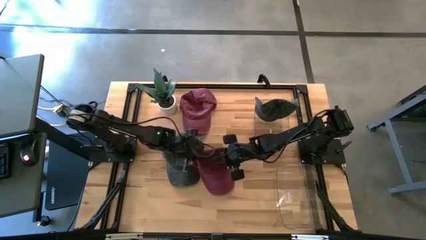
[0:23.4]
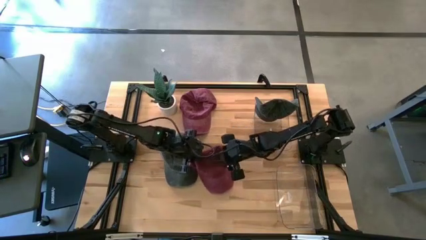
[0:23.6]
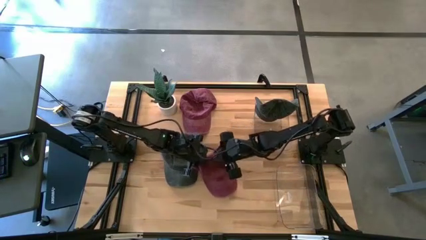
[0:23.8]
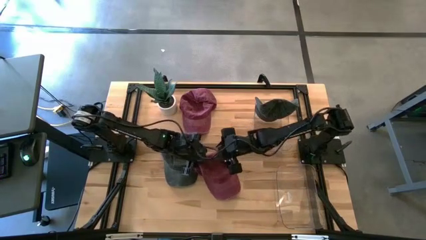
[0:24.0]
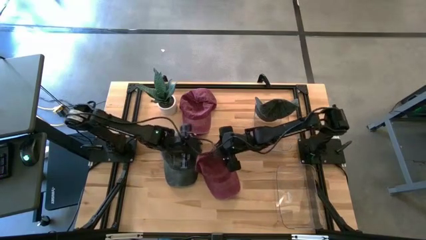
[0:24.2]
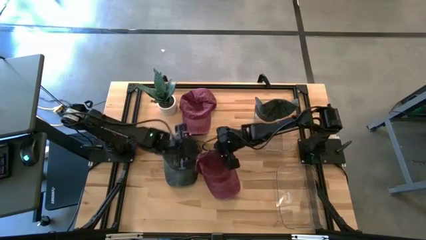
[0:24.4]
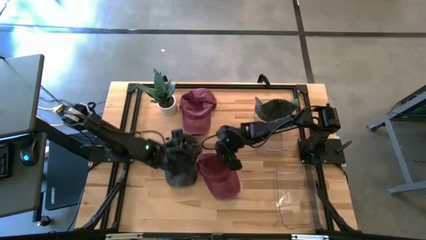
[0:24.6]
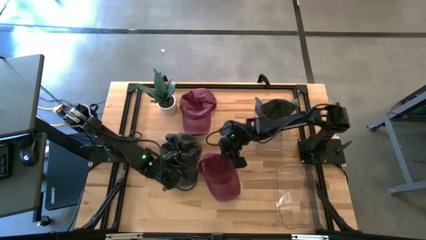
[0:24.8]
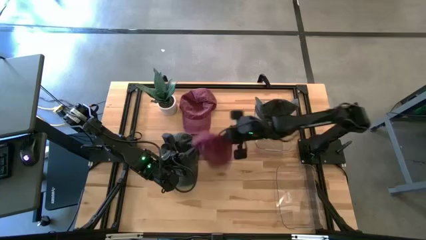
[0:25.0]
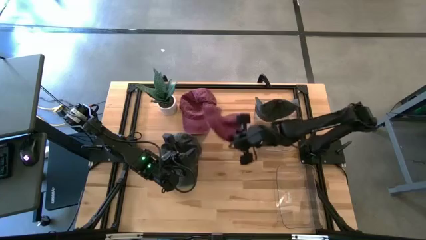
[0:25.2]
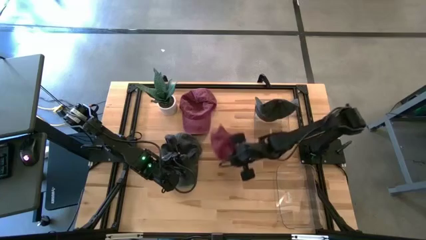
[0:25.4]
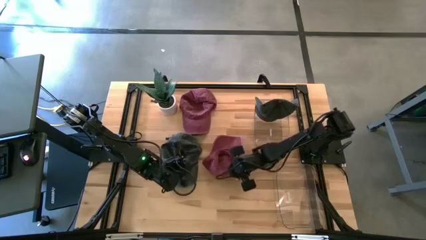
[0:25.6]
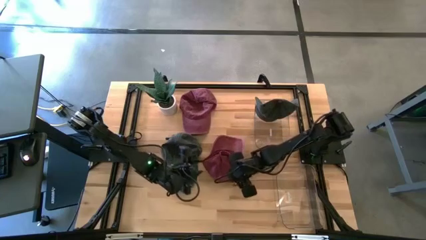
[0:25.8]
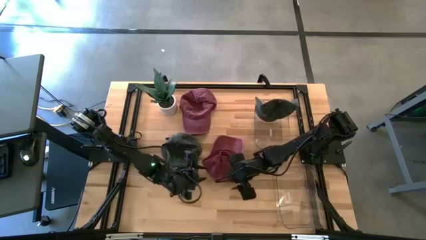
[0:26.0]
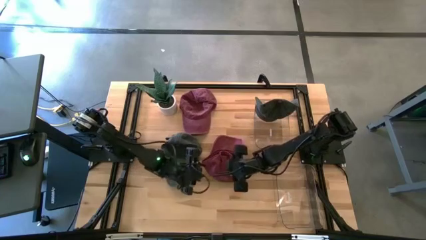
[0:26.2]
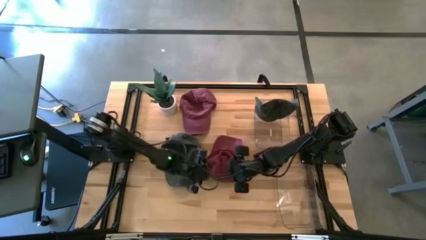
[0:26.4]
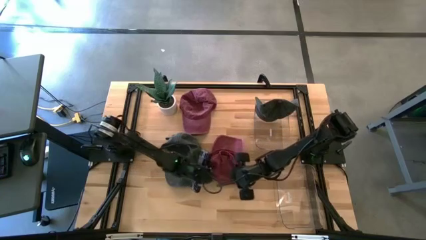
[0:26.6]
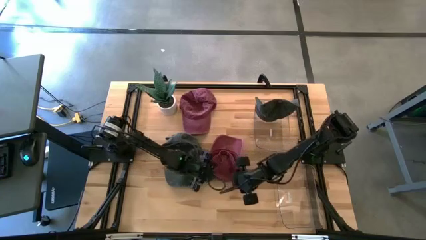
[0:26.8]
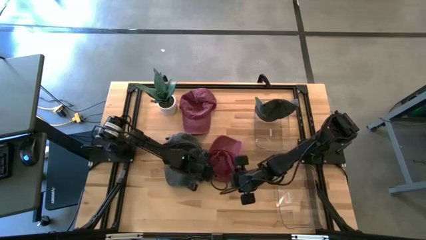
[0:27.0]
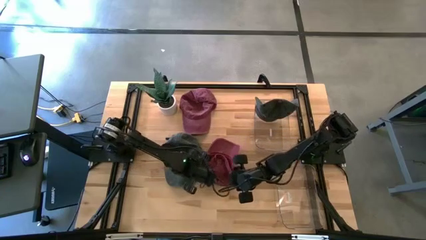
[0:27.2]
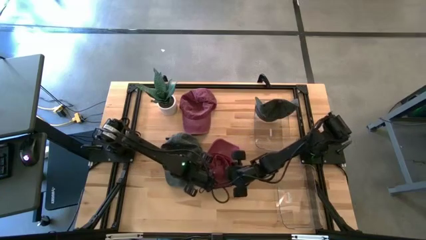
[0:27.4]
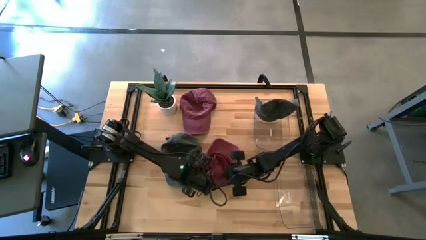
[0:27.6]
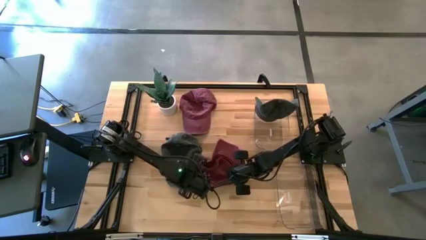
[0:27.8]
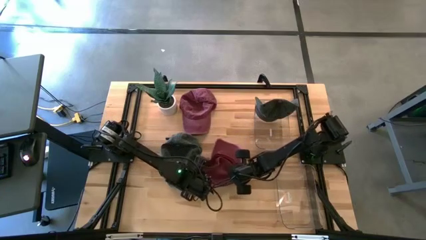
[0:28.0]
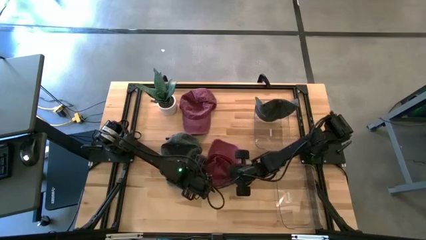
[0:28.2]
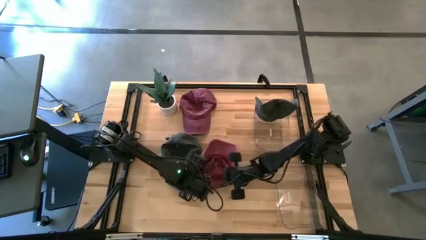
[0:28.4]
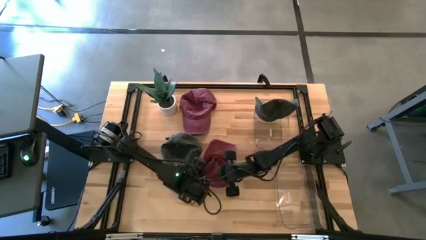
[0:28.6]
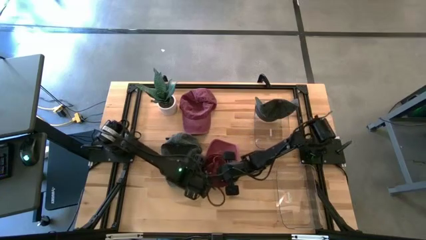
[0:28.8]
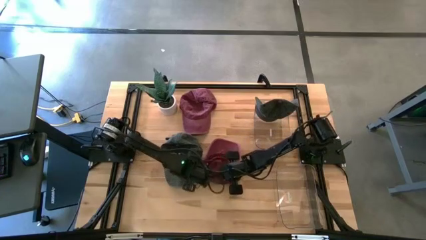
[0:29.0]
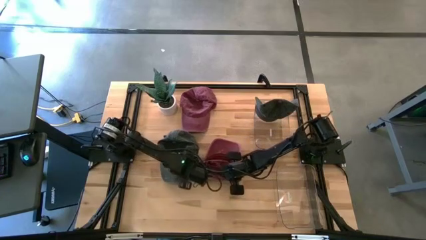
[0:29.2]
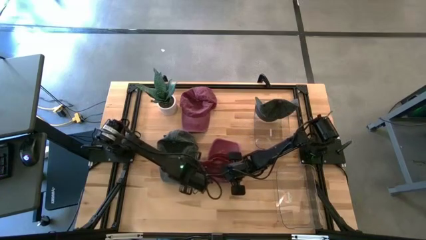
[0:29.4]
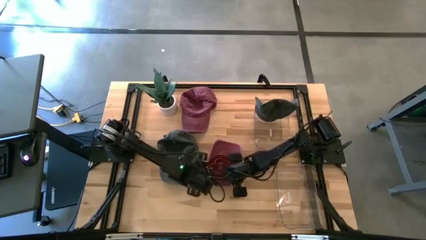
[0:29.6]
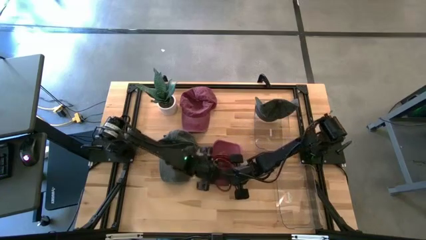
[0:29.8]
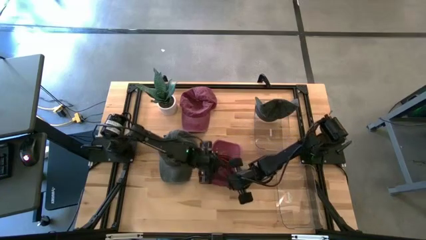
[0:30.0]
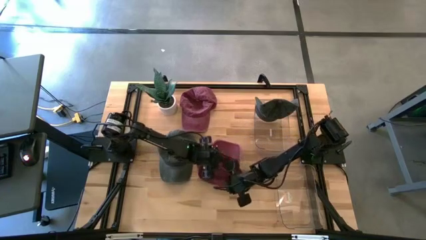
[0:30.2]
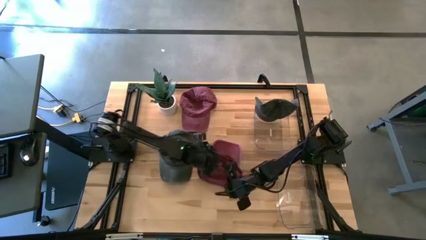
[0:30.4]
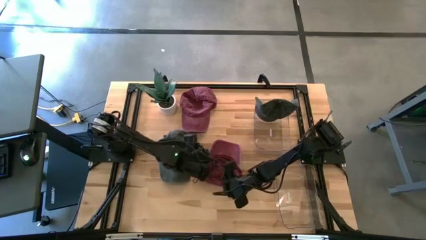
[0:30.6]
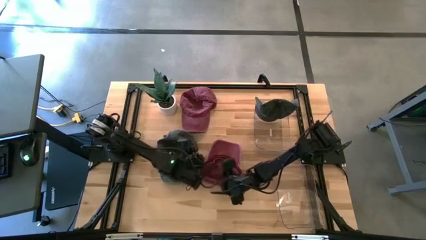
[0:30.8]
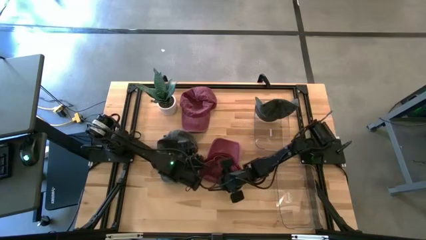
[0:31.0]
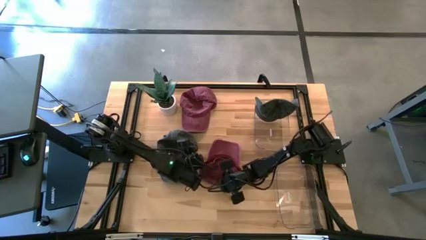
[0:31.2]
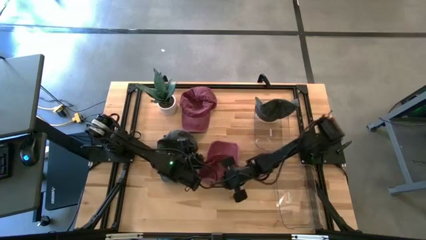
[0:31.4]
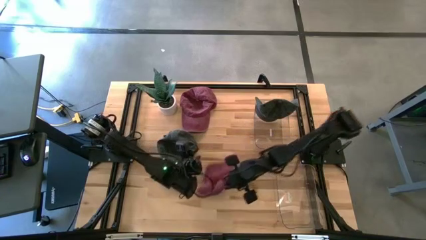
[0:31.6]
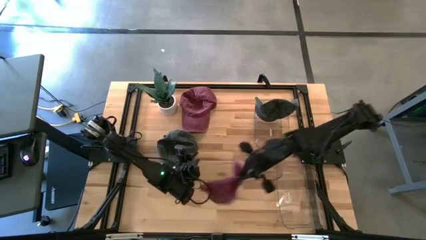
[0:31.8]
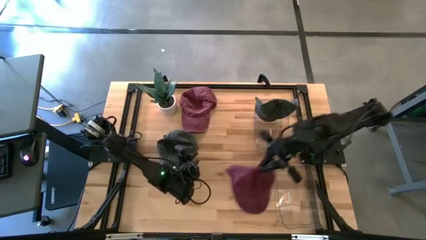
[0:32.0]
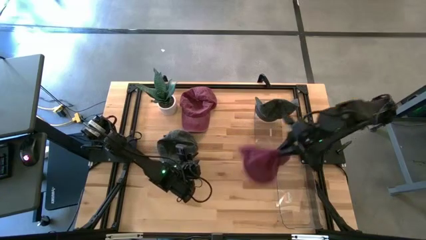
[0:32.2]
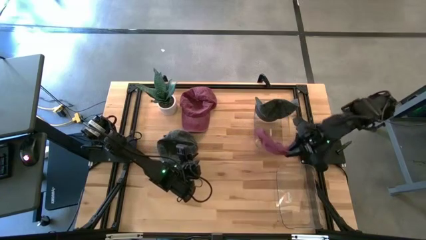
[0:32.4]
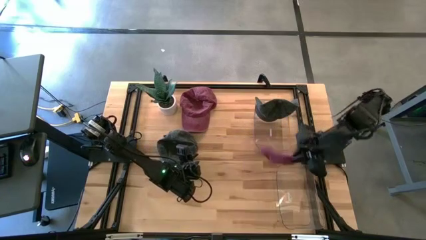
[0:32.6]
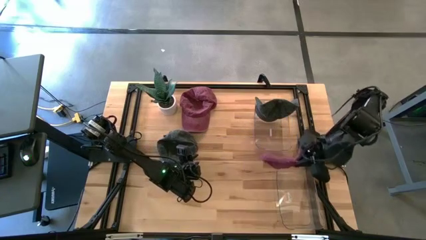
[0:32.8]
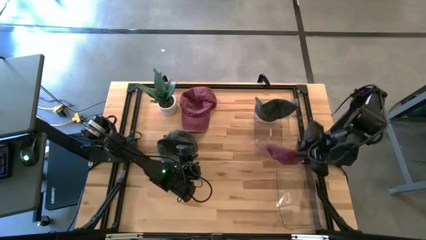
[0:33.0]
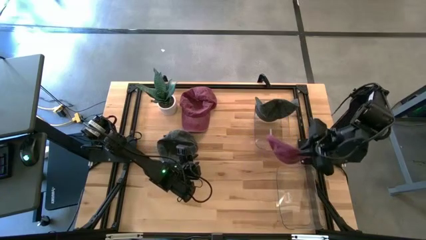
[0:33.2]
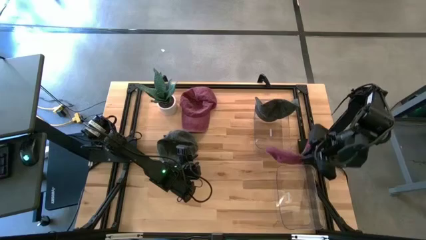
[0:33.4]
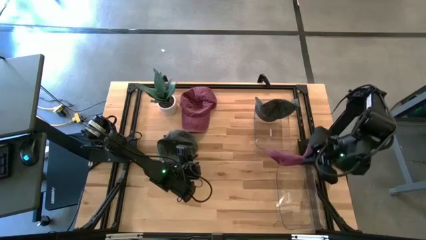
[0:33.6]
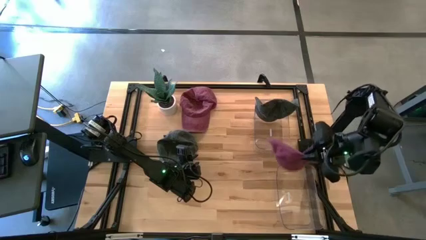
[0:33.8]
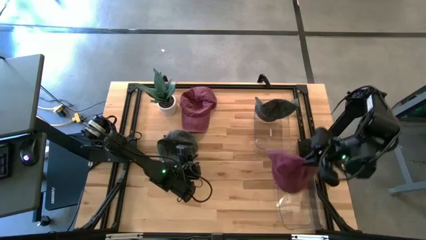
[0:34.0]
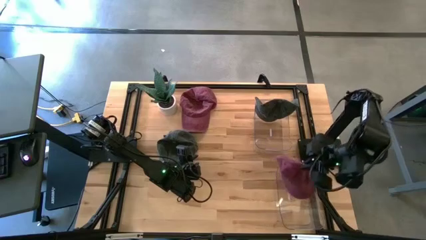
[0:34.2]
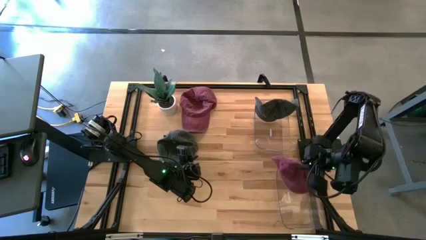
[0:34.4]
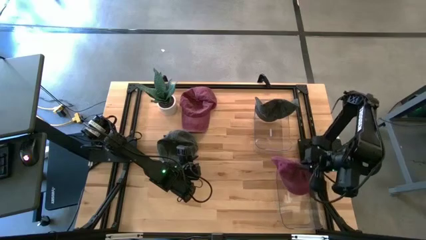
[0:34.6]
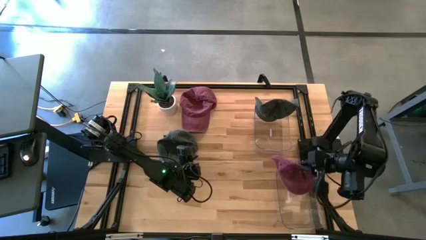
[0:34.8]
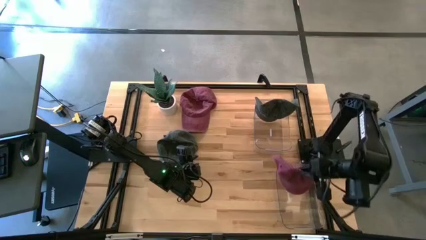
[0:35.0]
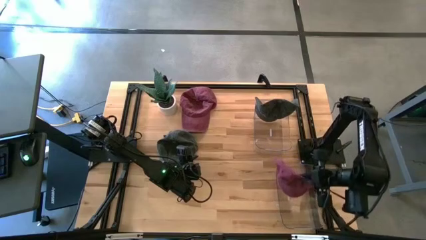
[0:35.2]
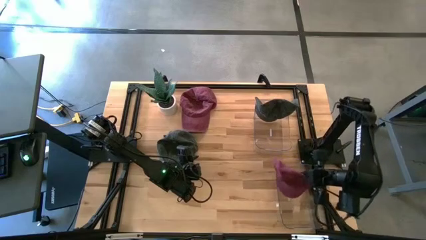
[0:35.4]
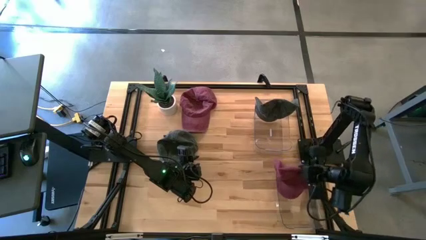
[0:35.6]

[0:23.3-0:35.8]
Task: Pick & Place hat
Put the bottom red cap into the bottom transparent bin

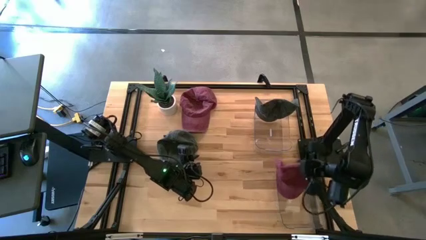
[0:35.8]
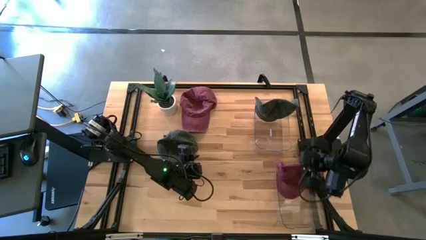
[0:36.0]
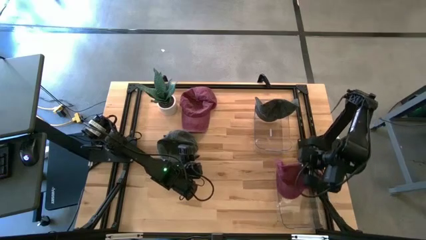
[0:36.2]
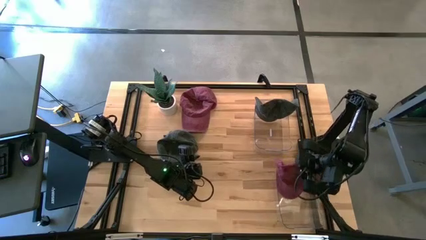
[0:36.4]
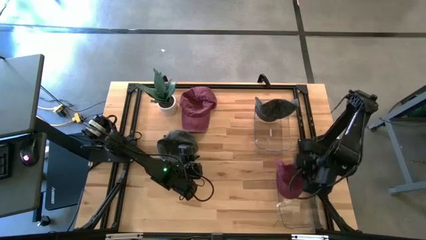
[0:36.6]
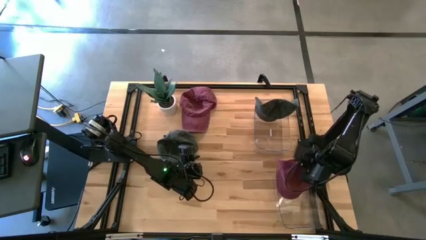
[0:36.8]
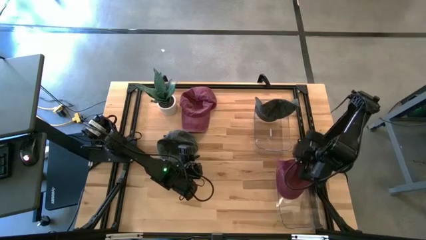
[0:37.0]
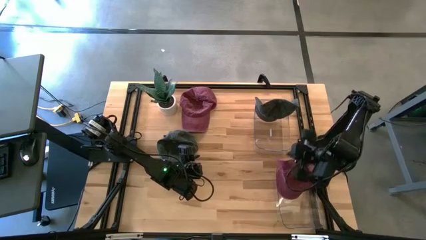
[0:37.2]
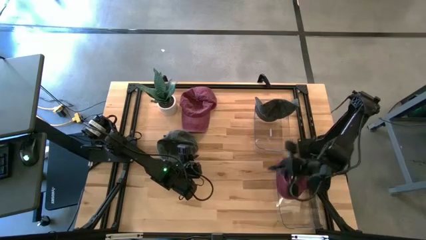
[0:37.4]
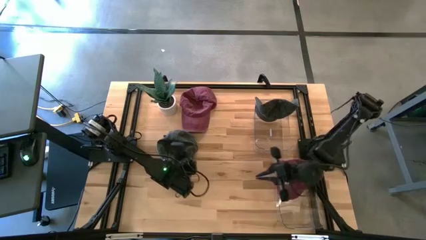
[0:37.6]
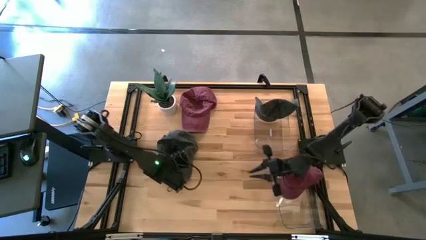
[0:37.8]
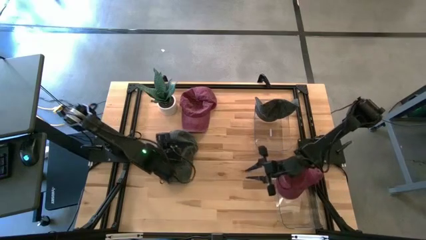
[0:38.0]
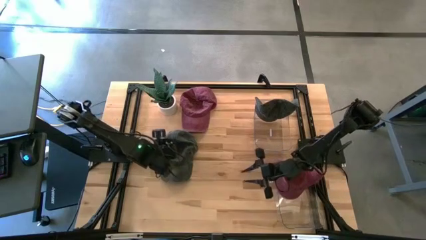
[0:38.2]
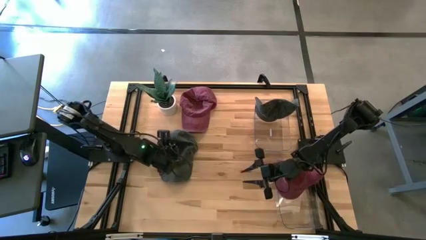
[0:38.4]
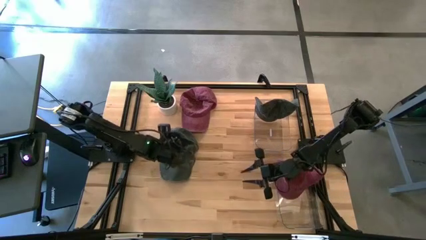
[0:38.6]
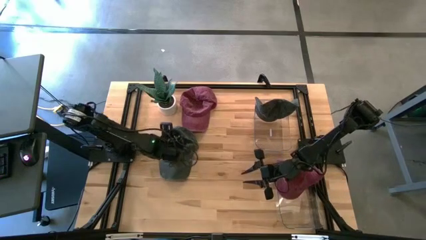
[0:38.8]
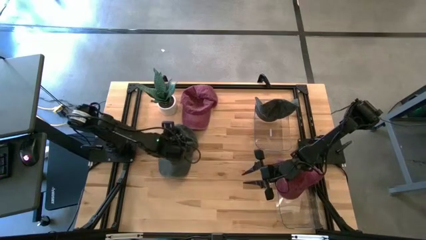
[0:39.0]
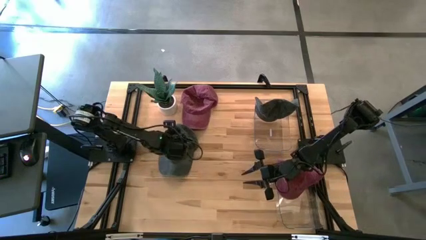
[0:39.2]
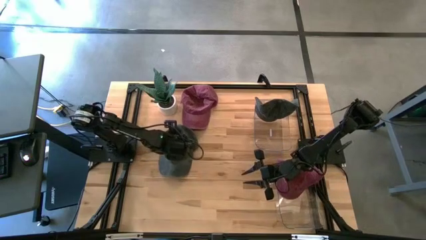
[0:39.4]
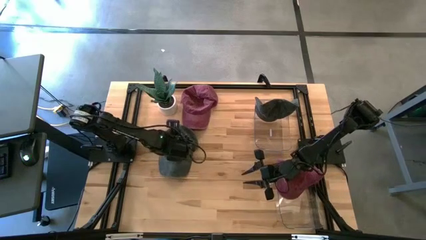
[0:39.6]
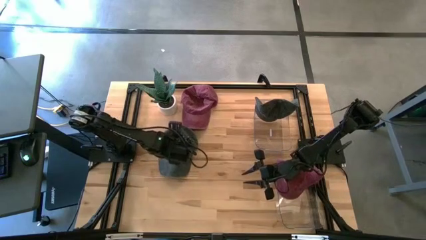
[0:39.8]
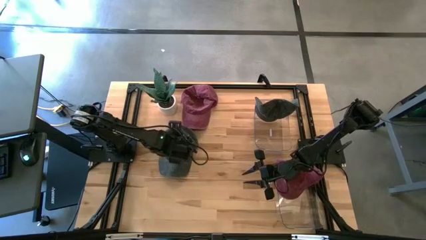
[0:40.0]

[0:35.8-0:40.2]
Put the black cap into the top transparent bin
